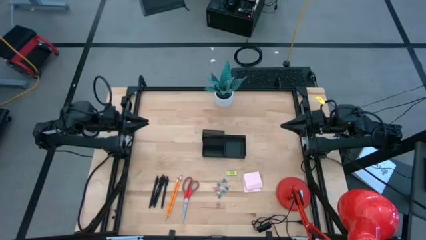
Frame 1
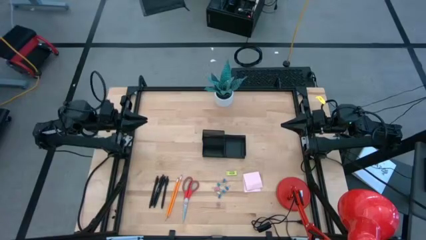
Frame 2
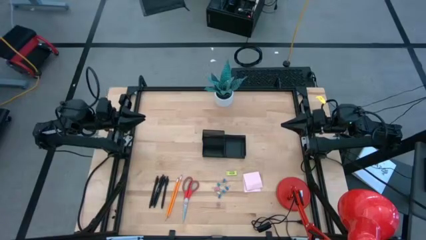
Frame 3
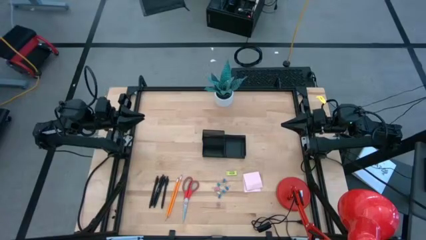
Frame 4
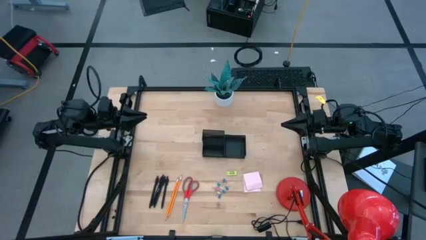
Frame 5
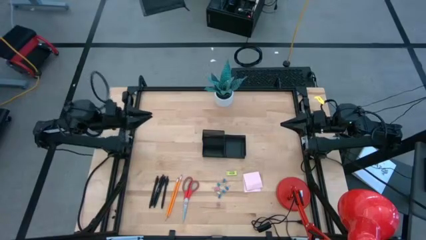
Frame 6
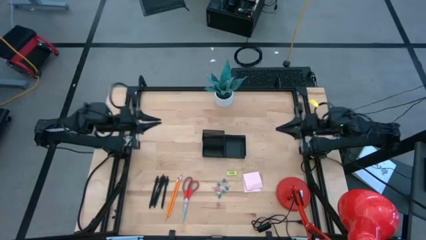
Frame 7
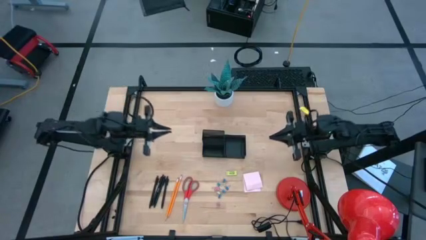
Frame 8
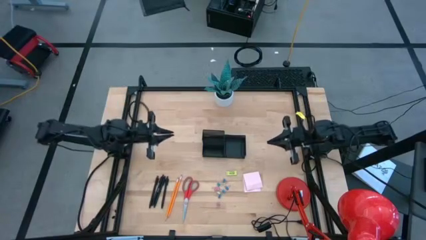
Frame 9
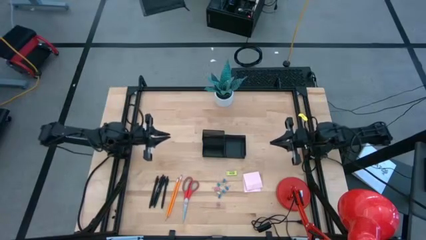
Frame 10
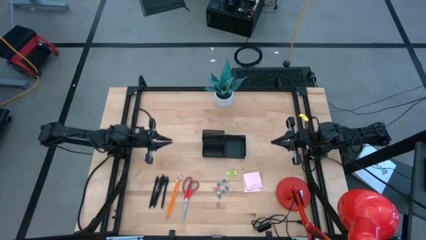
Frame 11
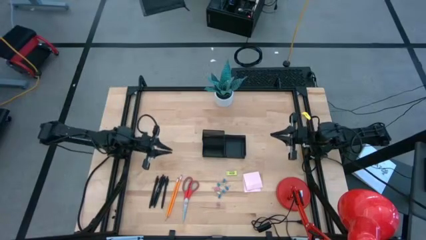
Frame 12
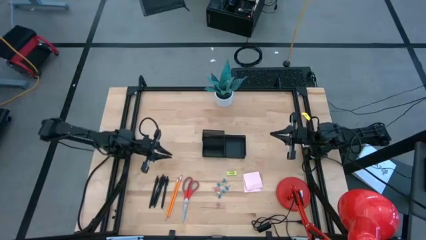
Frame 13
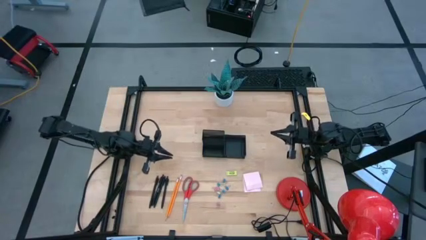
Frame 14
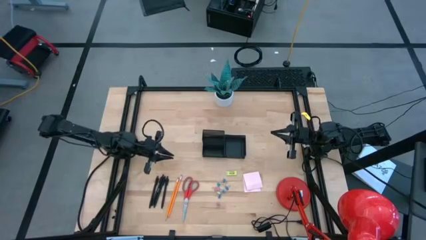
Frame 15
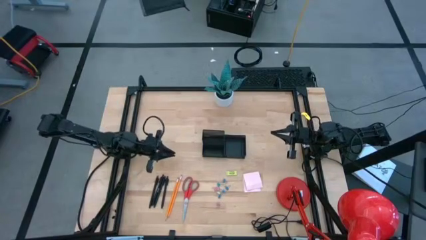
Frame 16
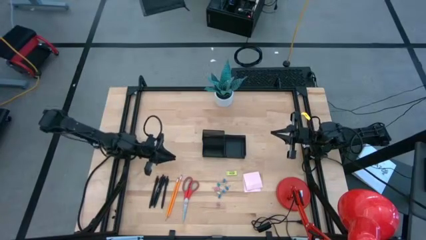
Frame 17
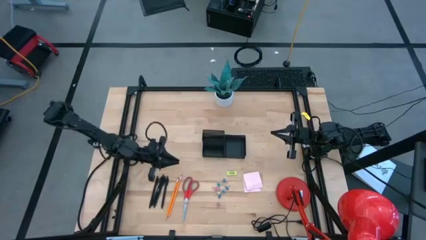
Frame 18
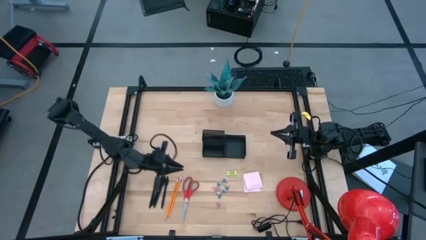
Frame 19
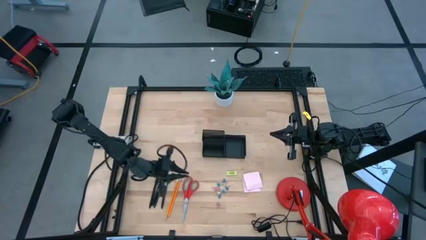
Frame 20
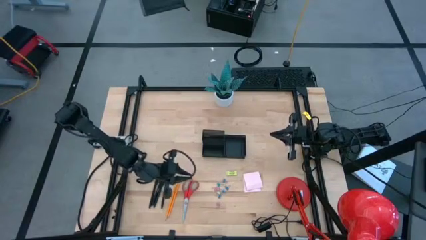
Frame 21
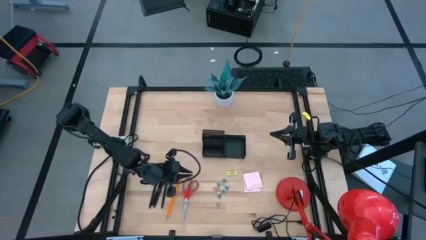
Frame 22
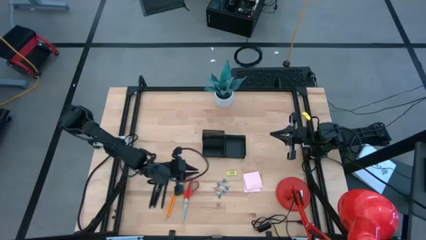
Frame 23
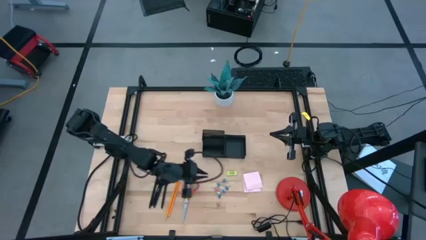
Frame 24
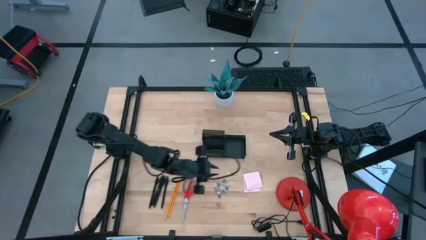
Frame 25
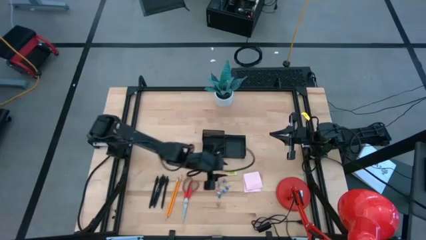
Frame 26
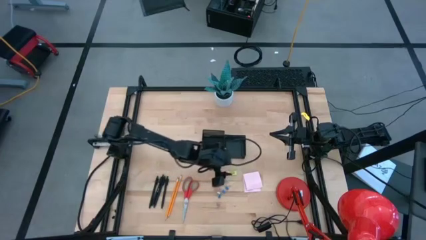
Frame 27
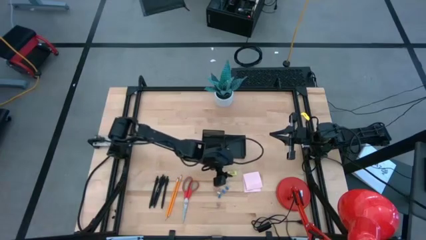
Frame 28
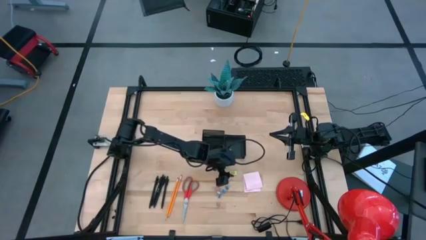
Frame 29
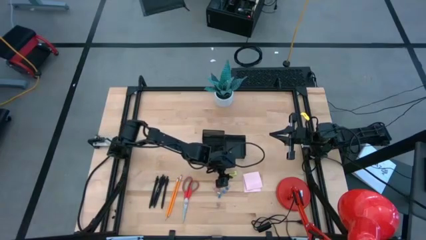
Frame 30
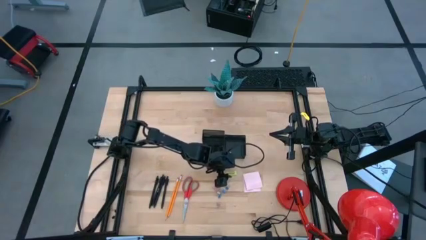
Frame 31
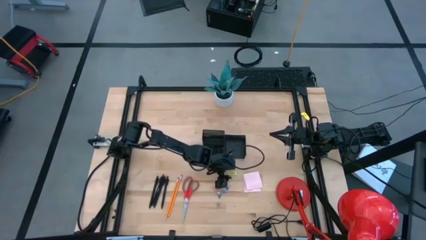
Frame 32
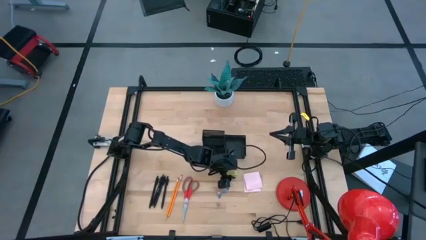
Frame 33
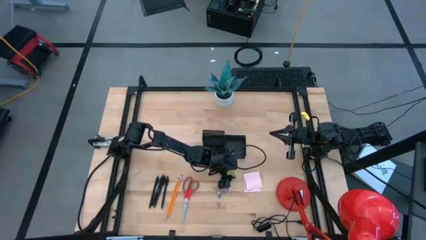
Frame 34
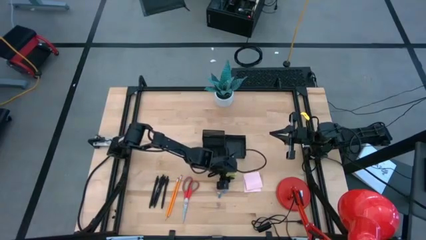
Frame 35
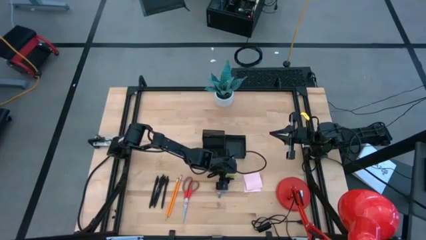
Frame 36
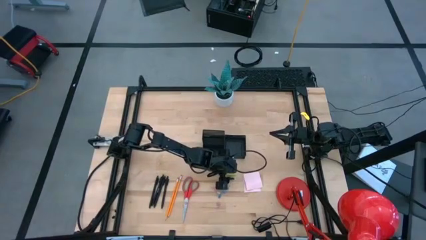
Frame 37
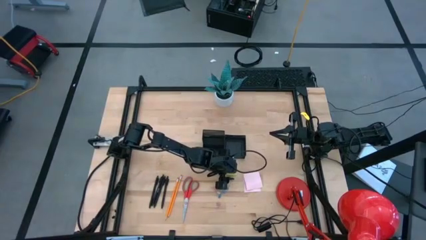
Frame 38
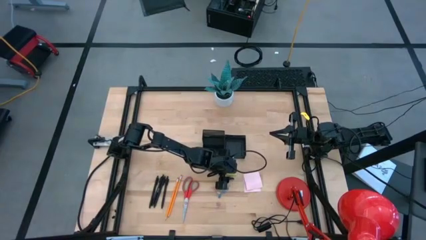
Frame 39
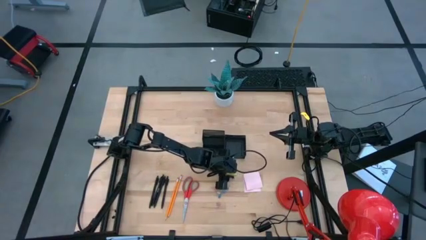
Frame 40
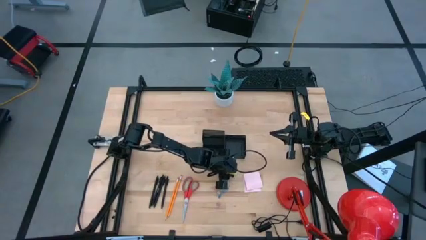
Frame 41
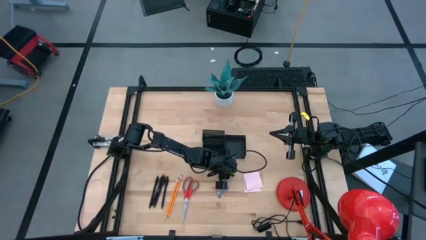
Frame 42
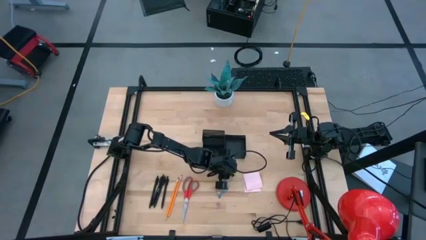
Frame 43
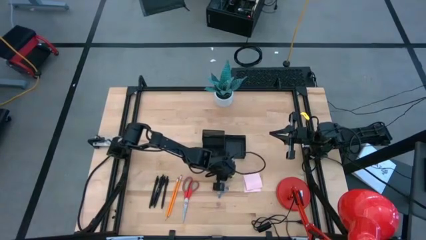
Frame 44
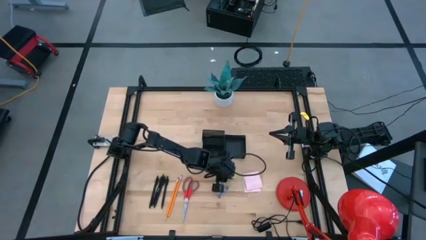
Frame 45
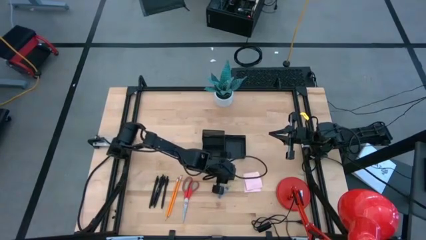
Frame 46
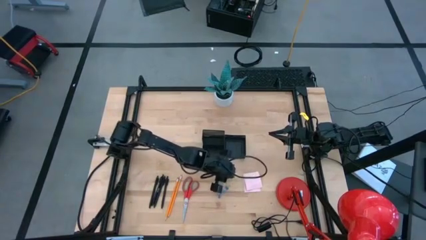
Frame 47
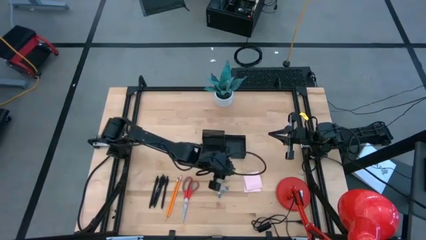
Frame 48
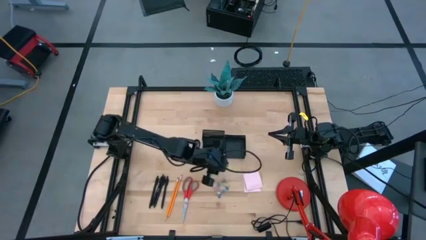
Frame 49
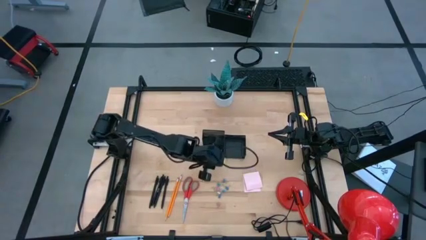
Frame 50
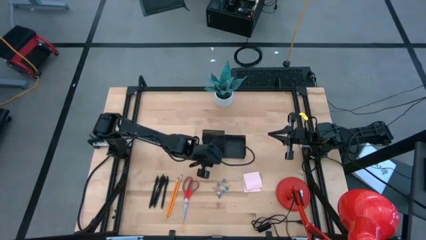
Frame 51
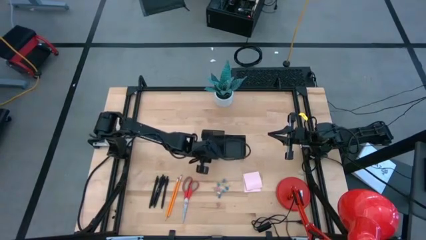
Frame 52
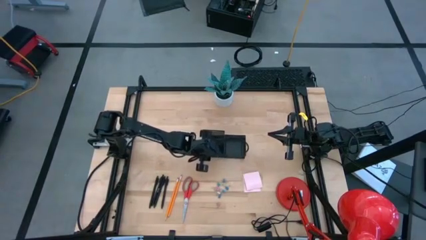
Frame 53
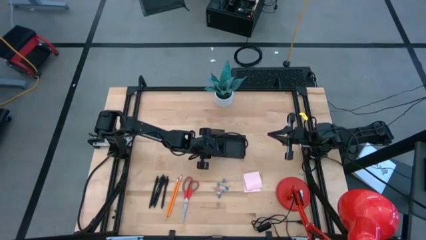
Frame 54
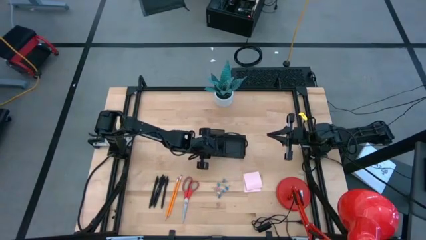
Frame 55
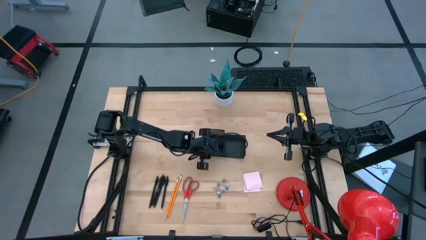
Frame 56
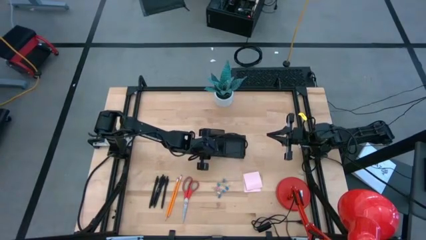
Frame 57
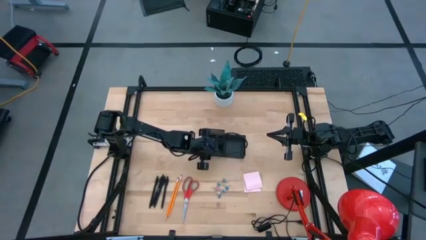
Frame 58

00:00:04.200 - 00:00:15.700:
Task: Pick and place office supplies into organizer
Put the green eraser into the desk organizer

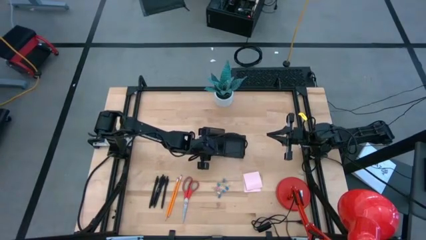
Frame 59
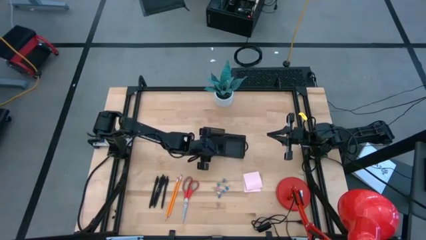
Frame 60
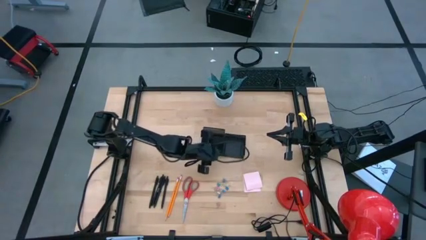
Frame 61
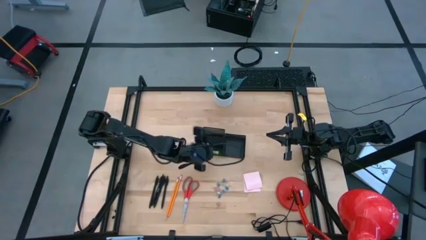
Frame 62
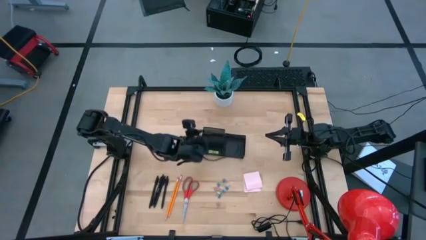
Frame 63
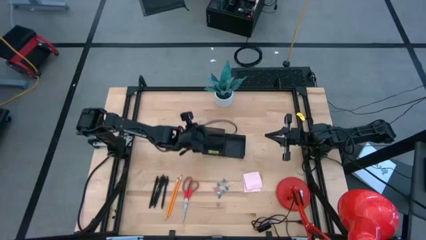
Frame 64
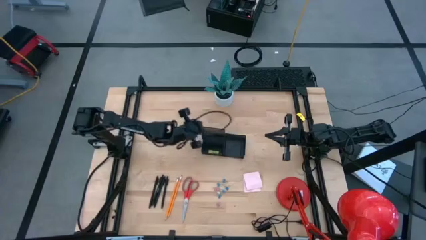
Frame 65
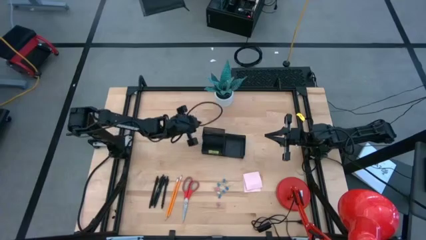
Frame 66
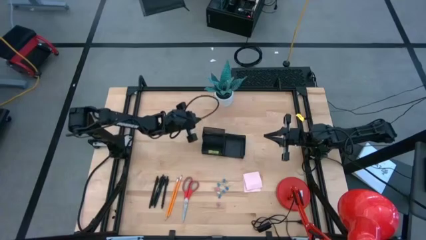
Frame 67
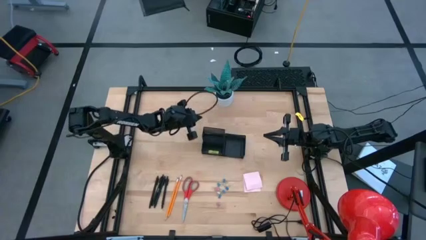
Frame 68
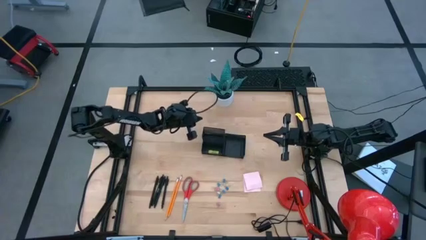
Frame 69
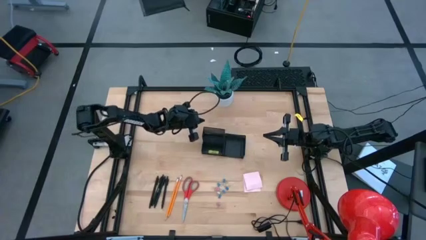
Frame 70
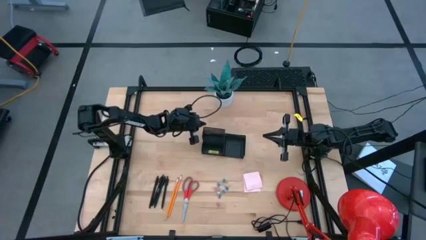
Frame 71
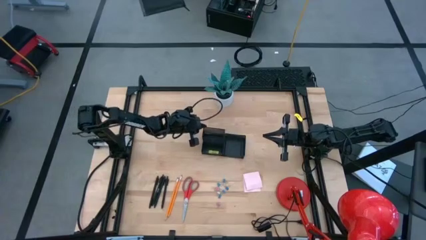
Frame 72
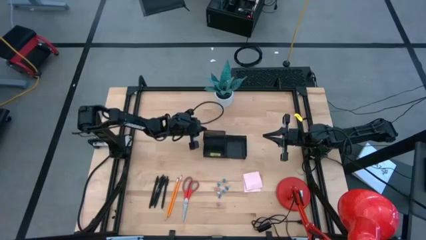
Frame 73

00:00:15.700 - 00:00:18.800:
Adjust the desk organizer
